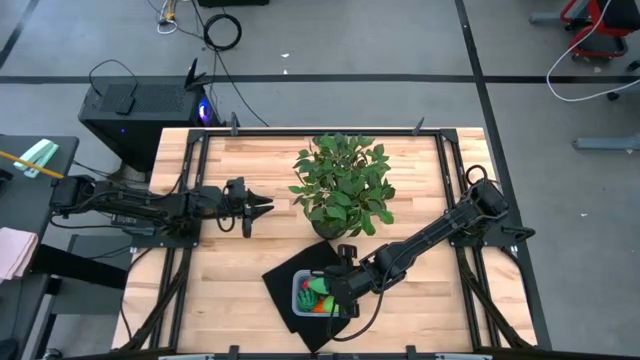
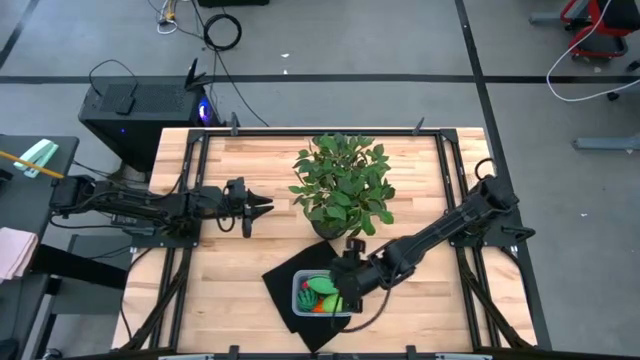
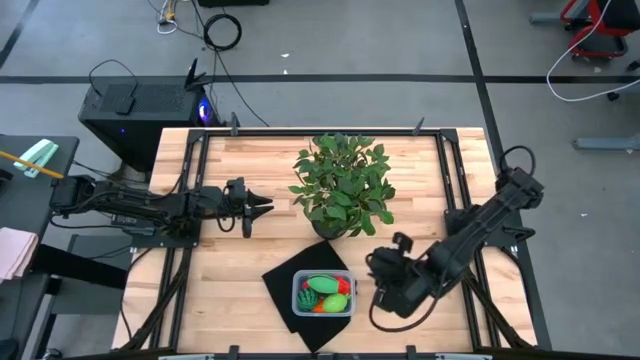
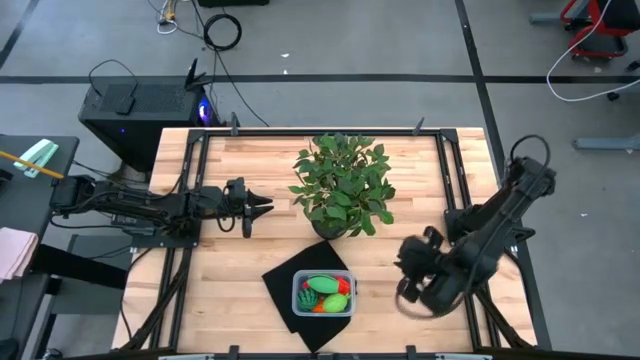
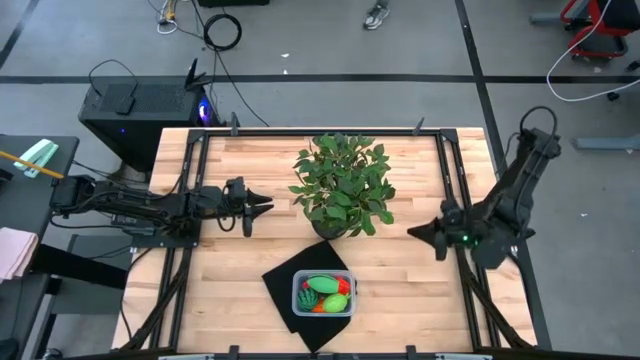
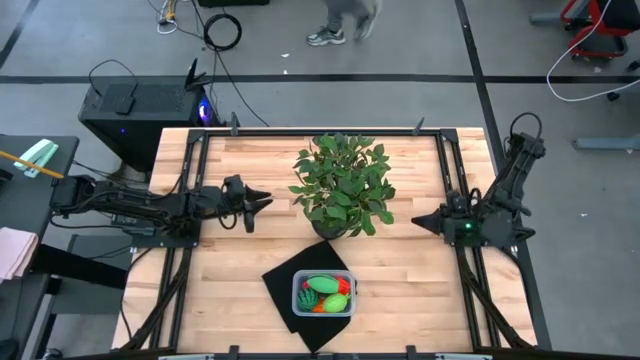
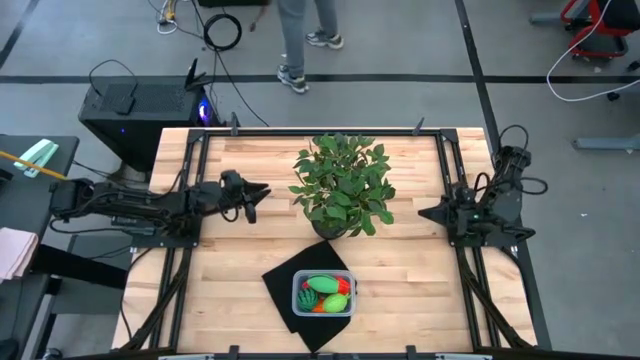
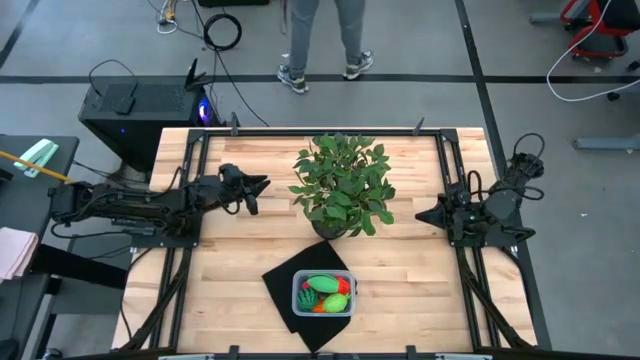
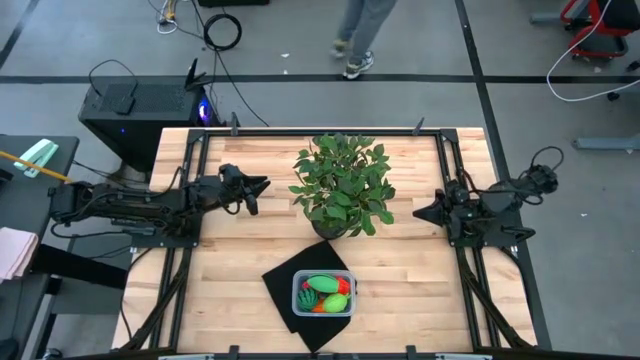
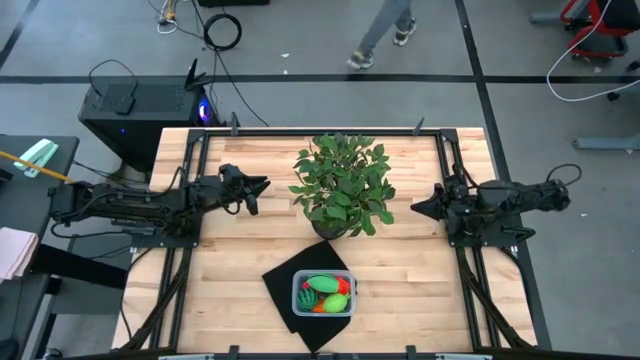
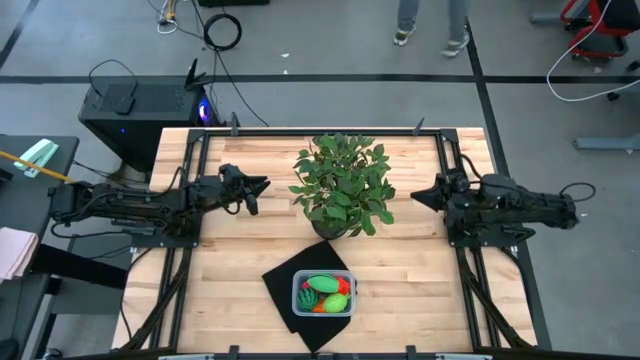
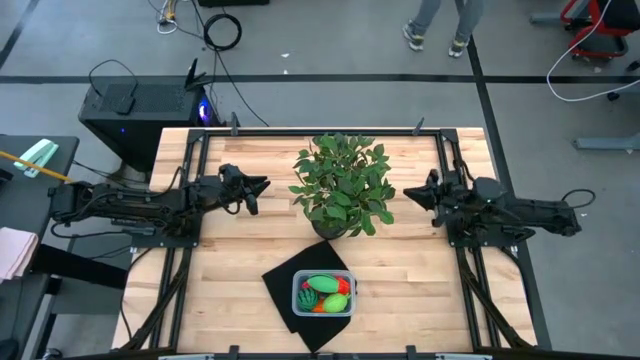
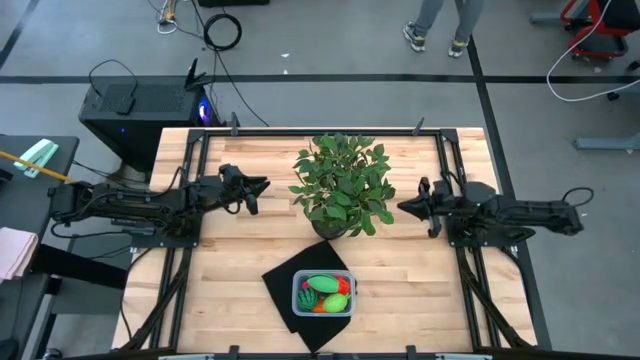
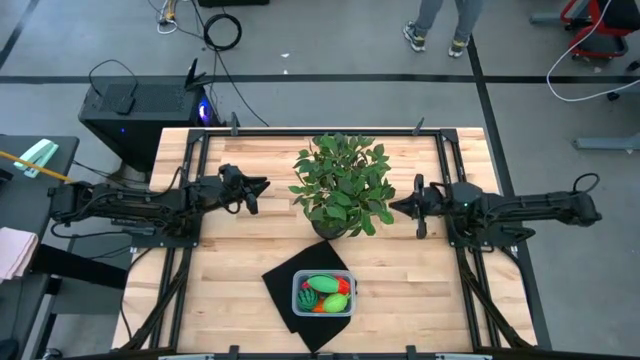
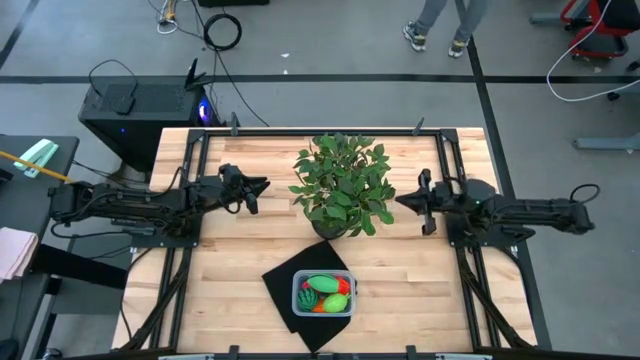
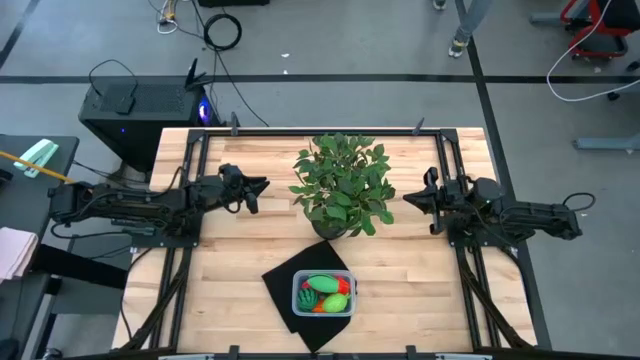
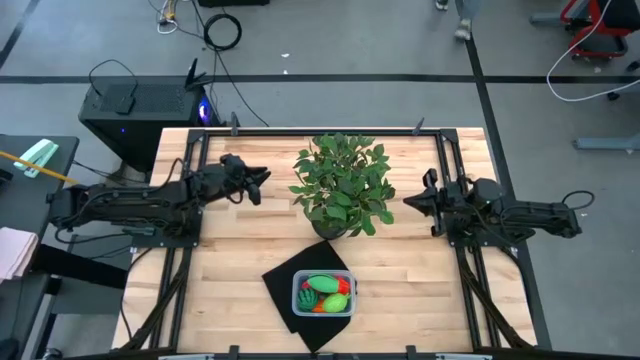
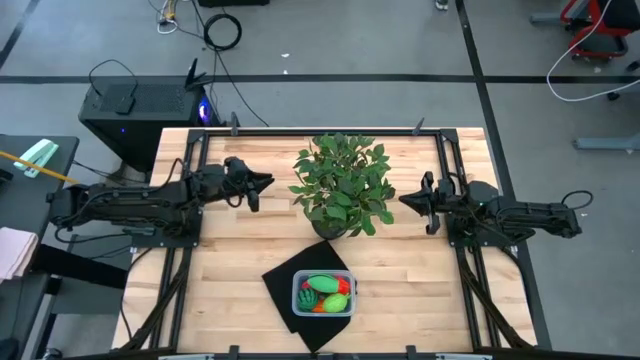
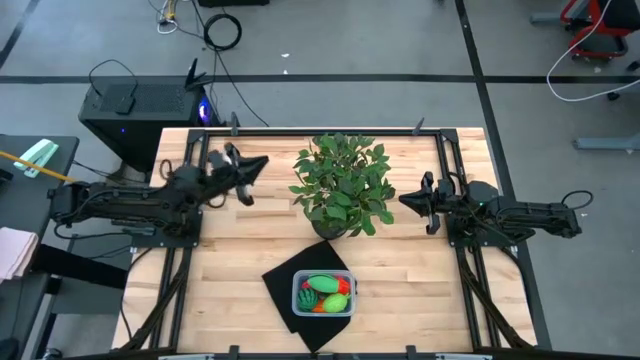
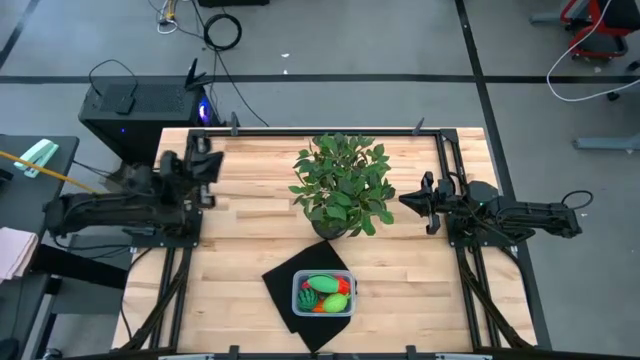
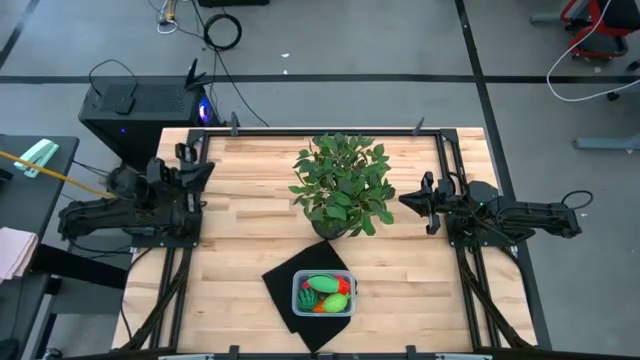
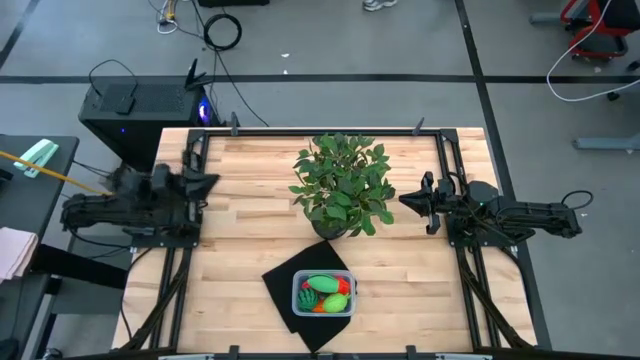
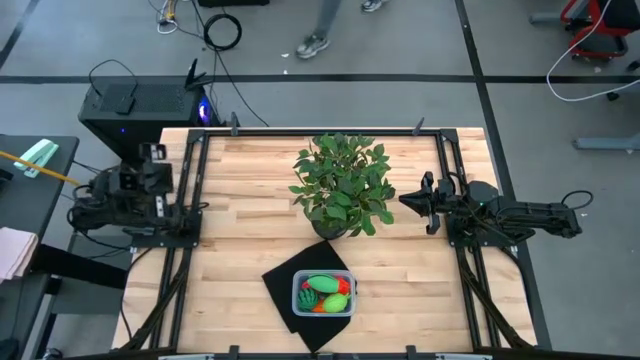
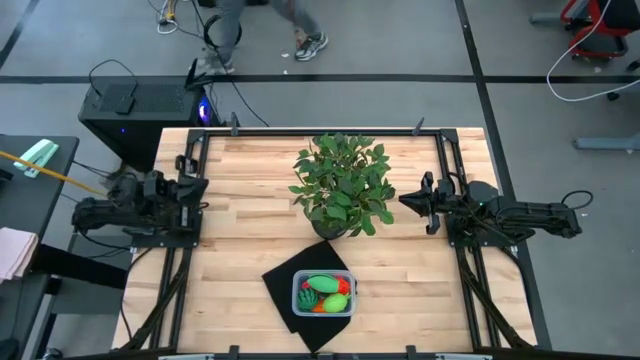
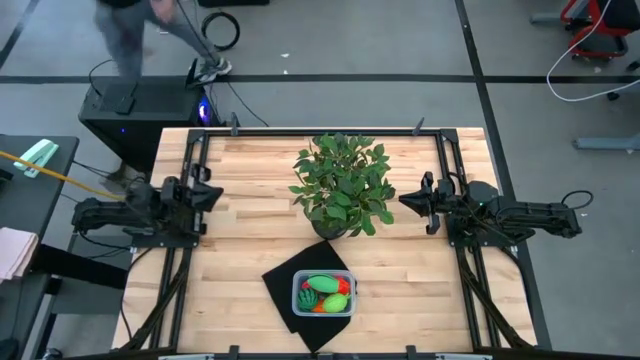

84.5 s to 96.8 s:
Task: Pick and placing Produce into tupperware
Return to Home Position

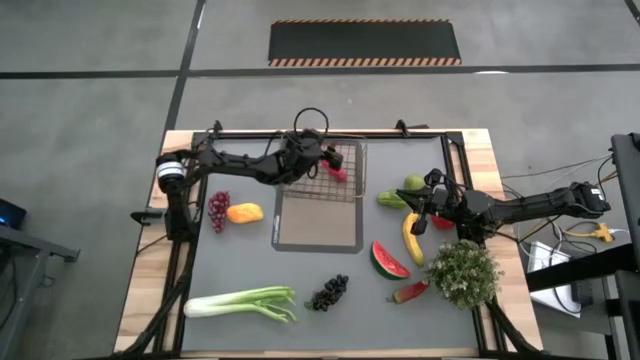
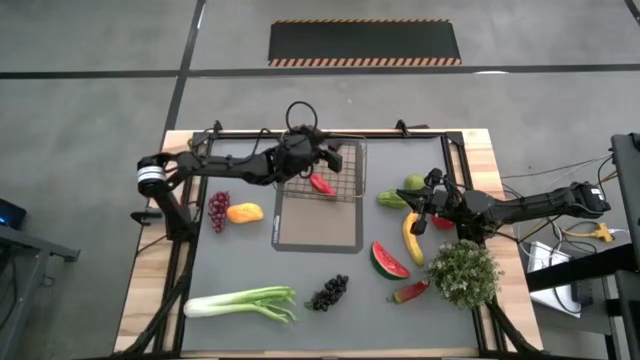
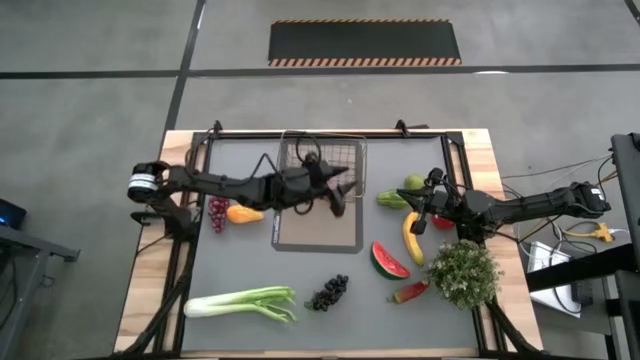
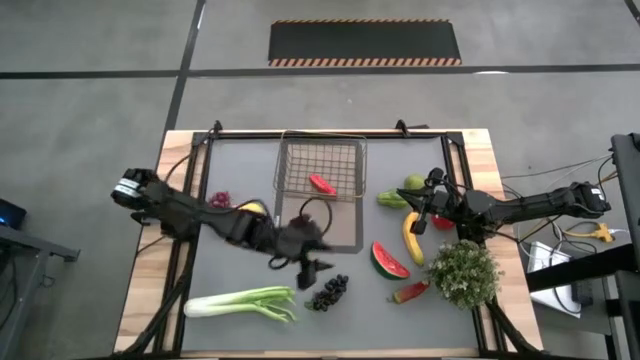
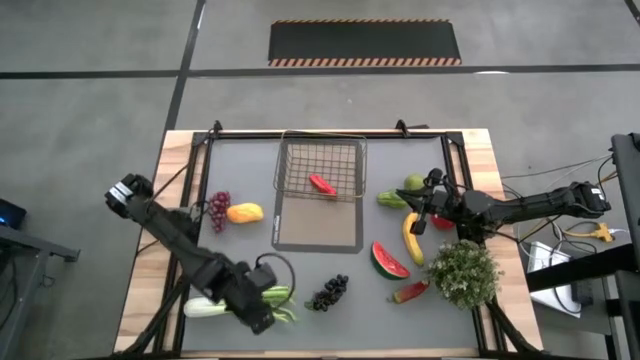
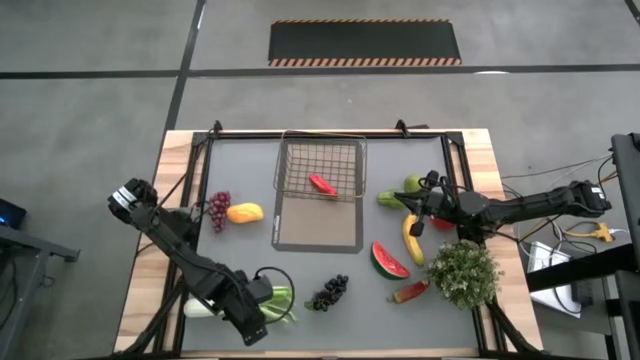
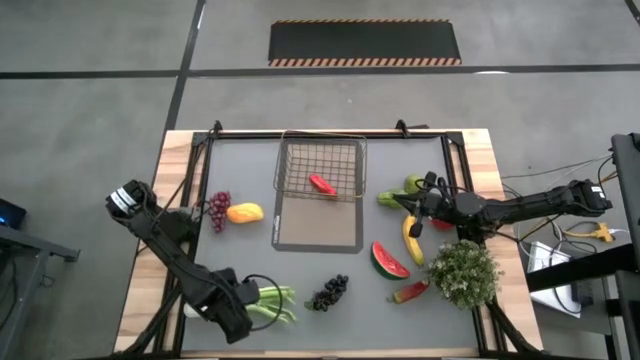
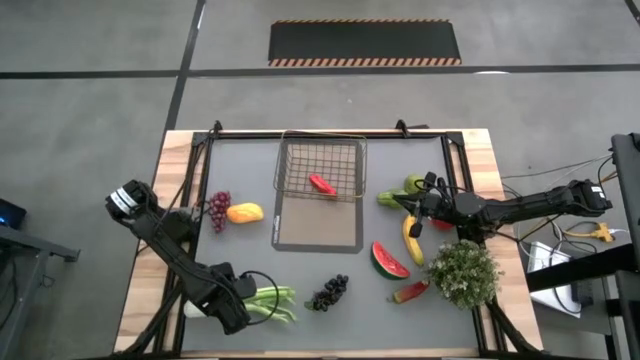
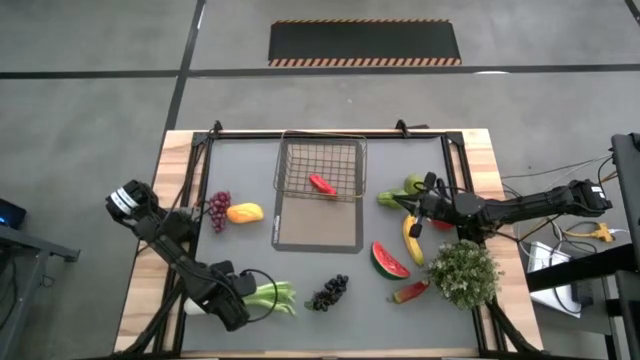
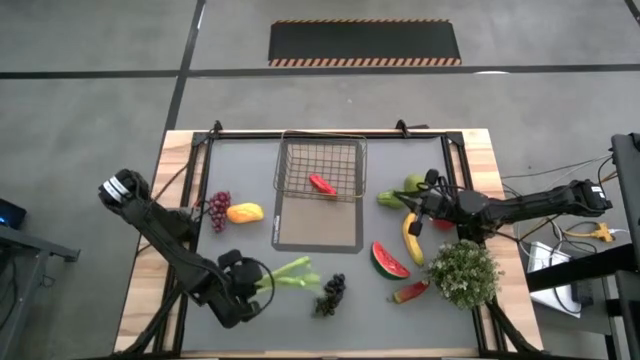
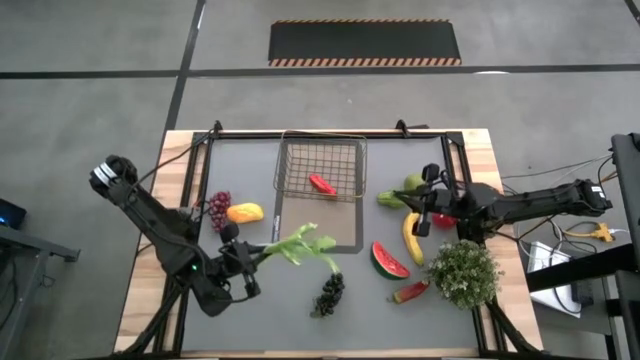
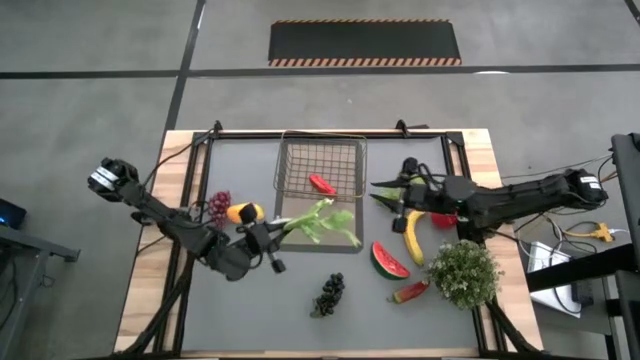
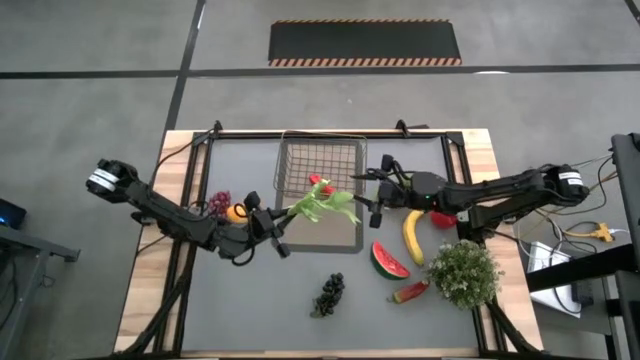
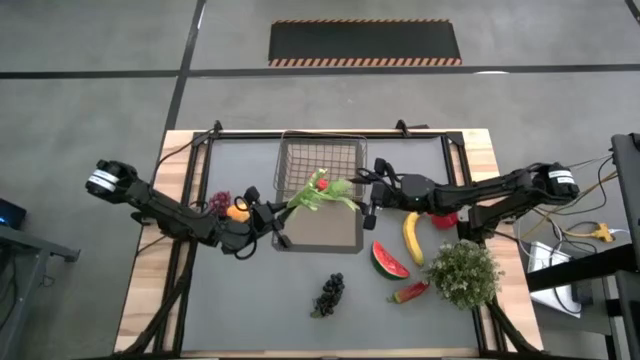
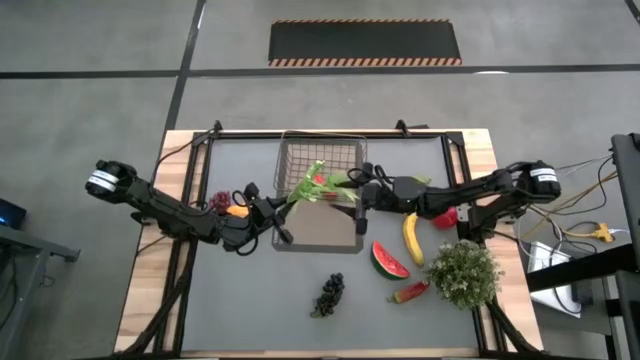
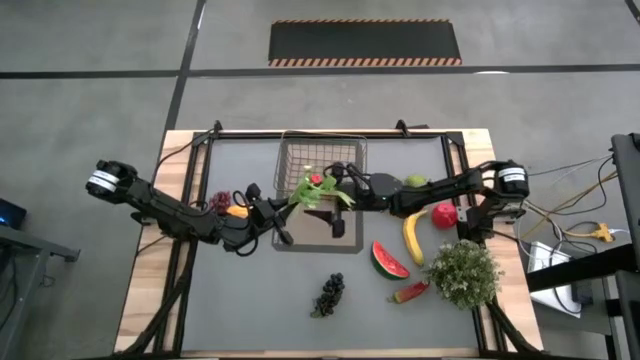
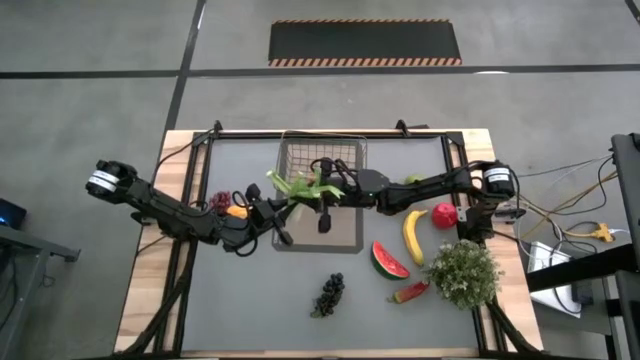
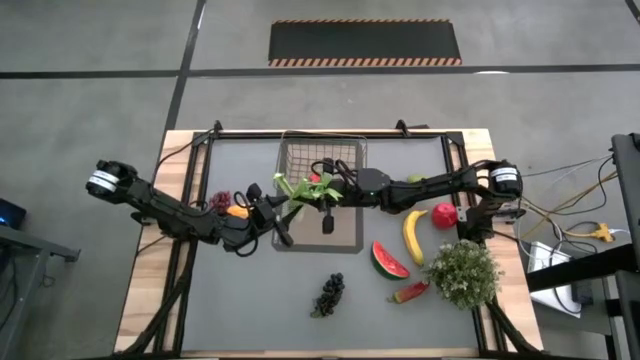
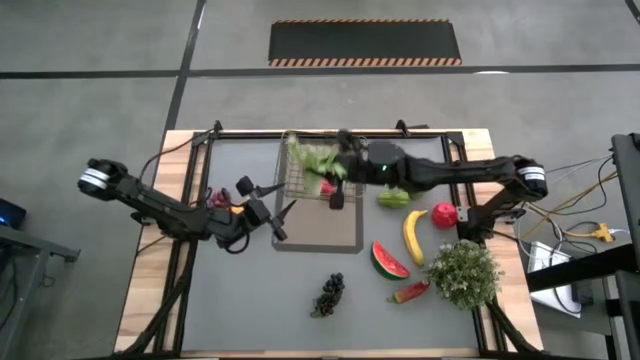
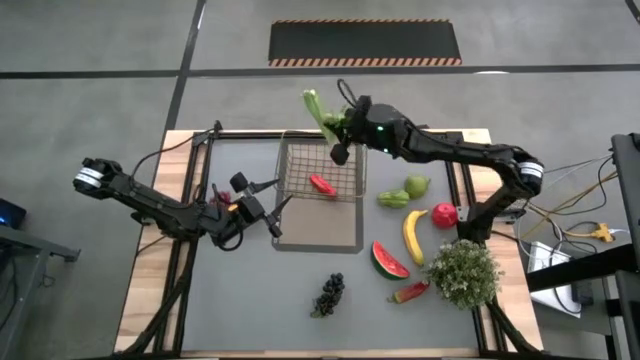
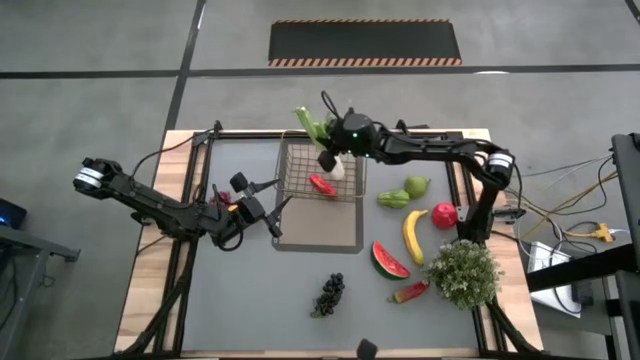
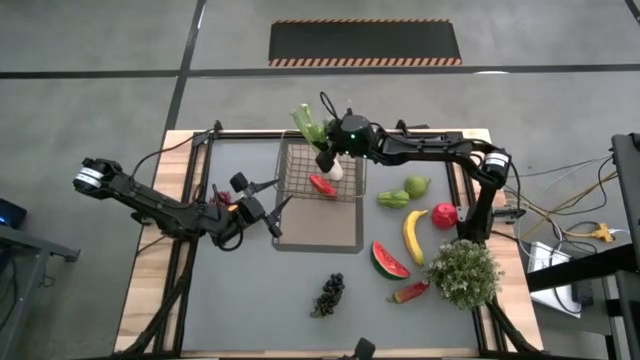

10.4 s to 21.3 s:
Task: Build produce basket
Put the Chinese cabbage into the wire basket
